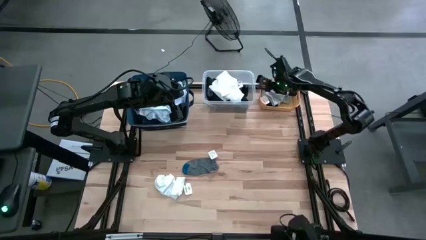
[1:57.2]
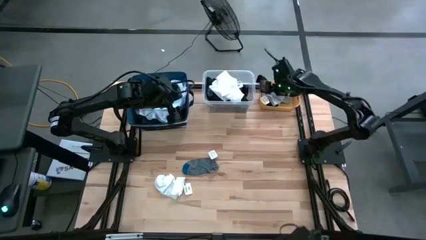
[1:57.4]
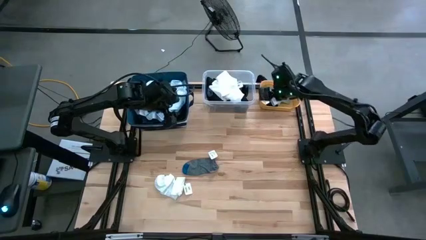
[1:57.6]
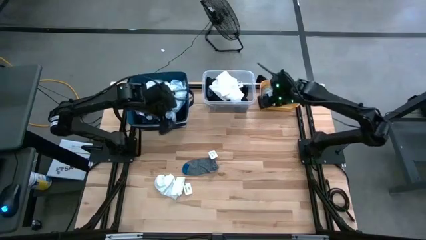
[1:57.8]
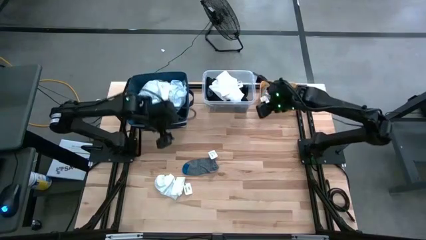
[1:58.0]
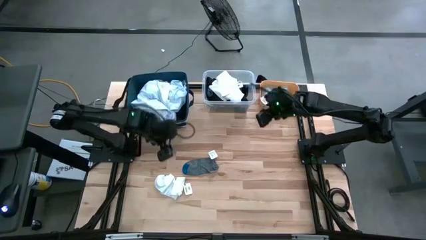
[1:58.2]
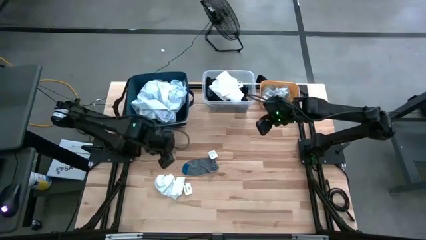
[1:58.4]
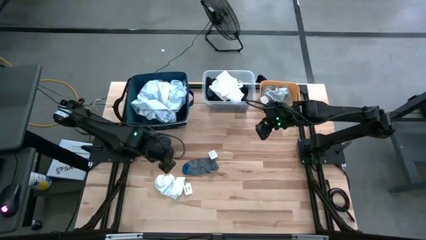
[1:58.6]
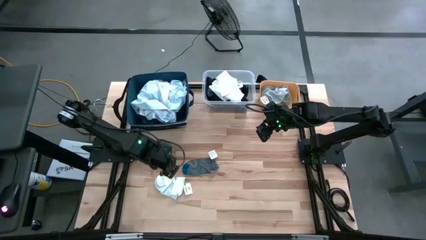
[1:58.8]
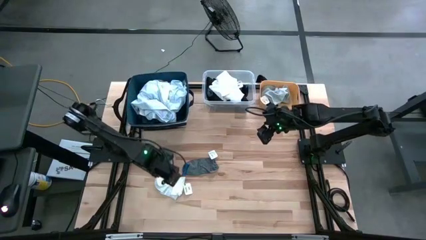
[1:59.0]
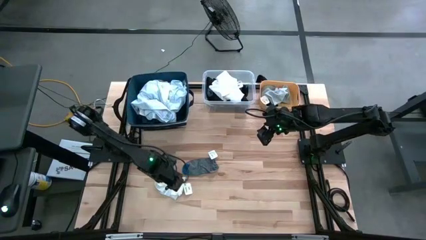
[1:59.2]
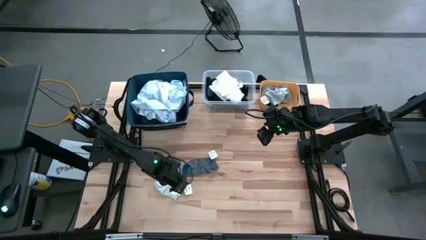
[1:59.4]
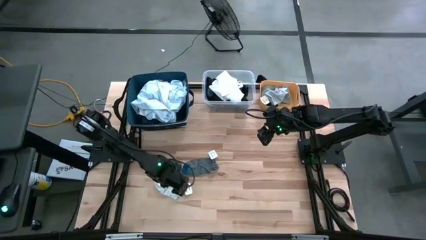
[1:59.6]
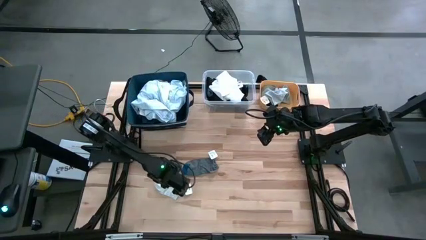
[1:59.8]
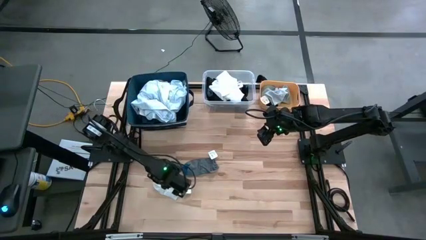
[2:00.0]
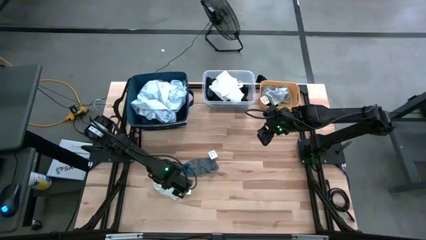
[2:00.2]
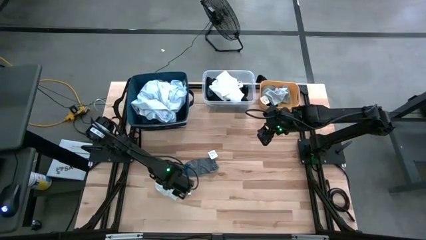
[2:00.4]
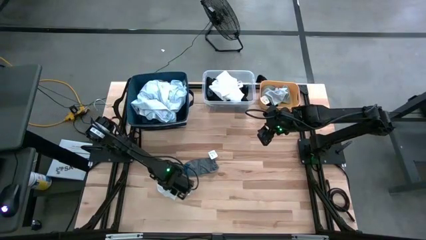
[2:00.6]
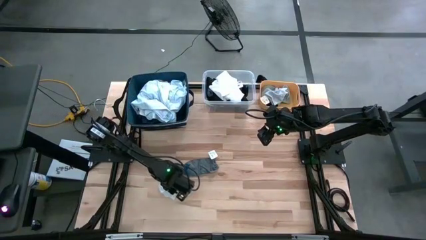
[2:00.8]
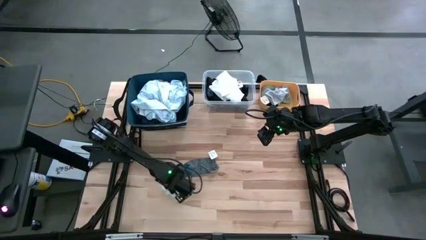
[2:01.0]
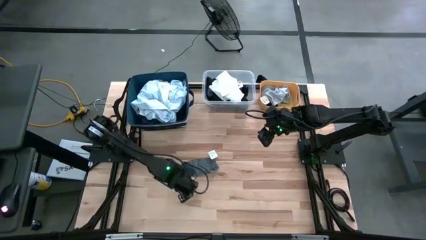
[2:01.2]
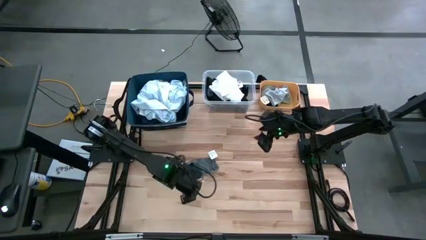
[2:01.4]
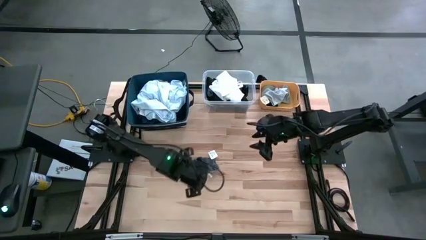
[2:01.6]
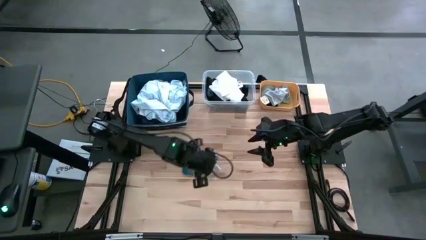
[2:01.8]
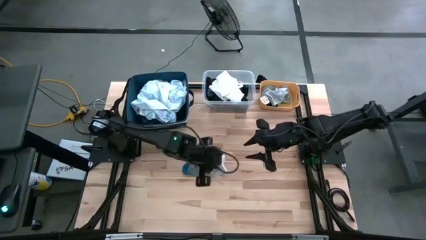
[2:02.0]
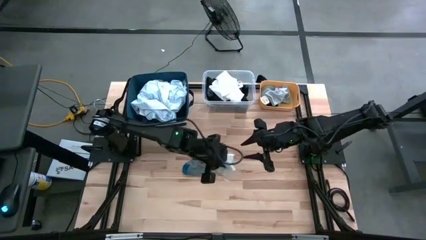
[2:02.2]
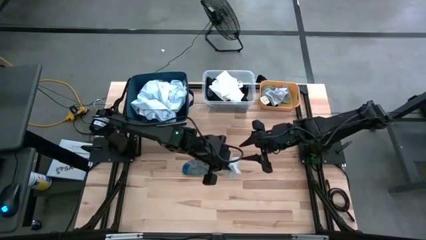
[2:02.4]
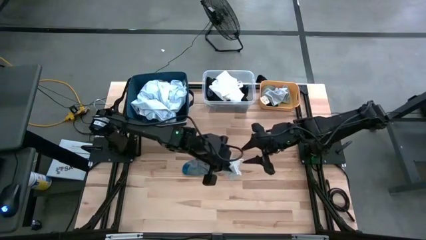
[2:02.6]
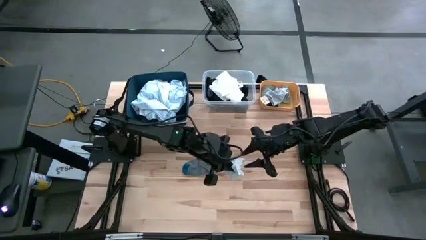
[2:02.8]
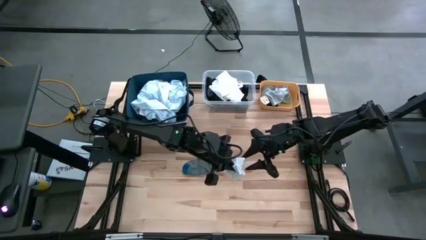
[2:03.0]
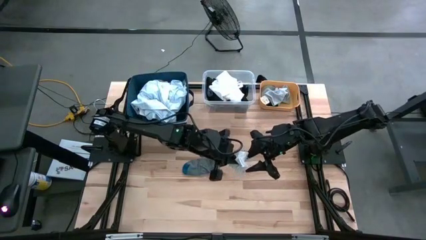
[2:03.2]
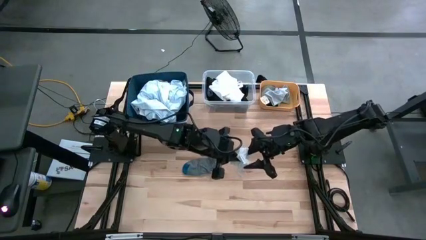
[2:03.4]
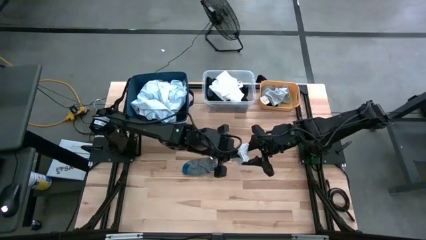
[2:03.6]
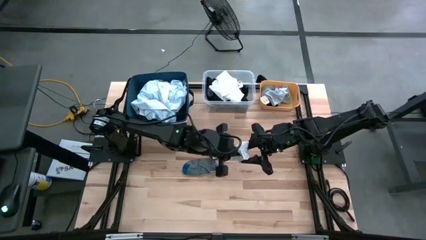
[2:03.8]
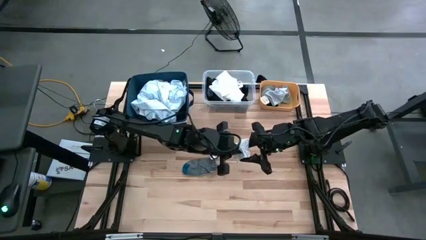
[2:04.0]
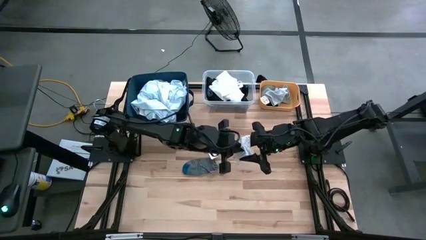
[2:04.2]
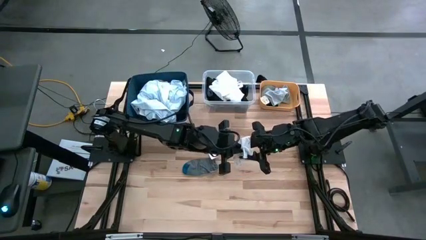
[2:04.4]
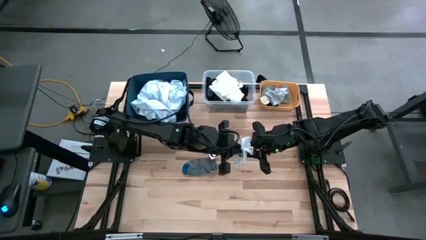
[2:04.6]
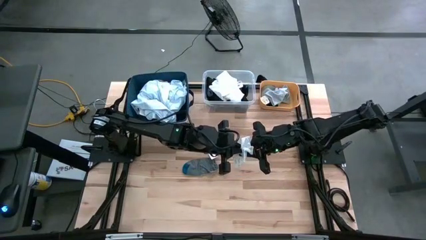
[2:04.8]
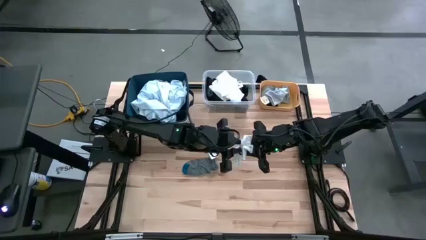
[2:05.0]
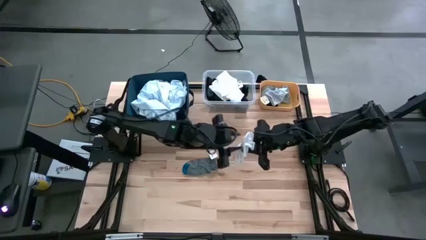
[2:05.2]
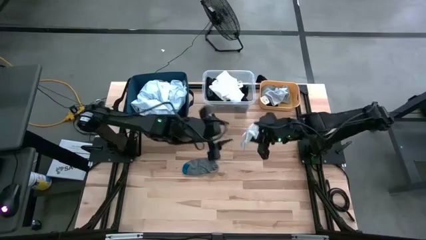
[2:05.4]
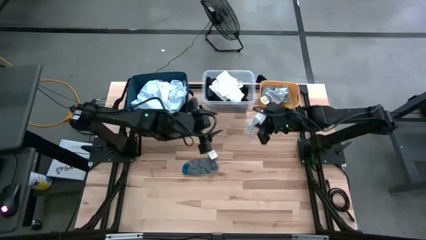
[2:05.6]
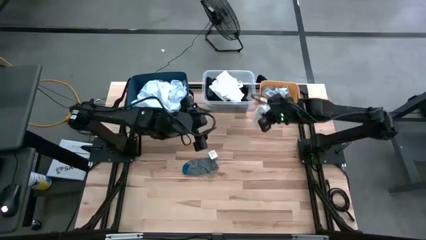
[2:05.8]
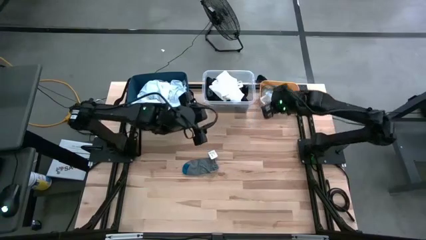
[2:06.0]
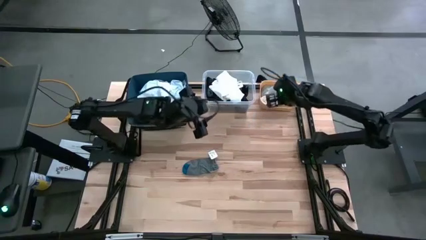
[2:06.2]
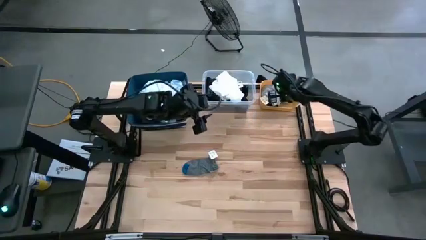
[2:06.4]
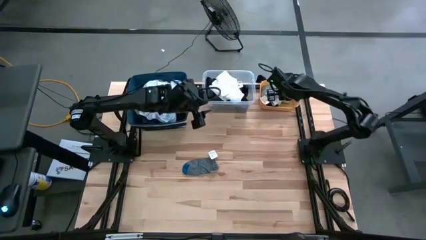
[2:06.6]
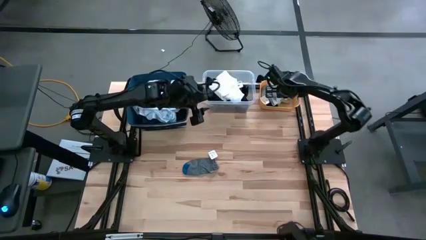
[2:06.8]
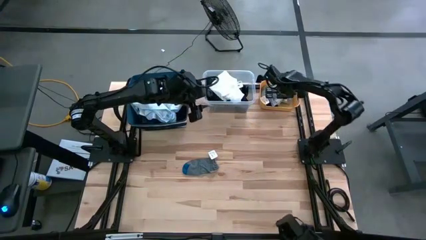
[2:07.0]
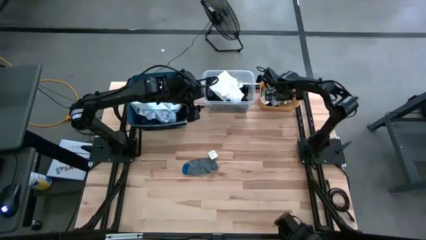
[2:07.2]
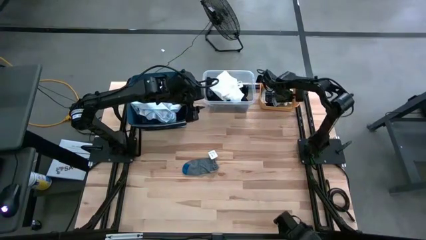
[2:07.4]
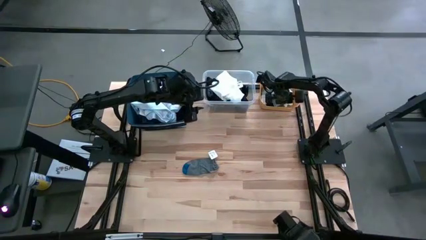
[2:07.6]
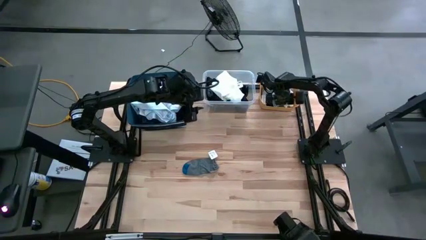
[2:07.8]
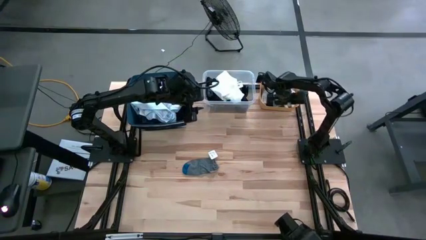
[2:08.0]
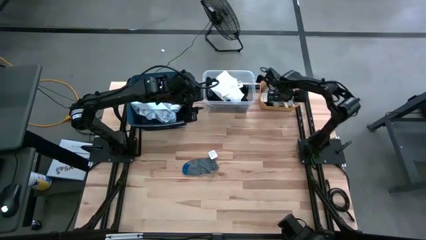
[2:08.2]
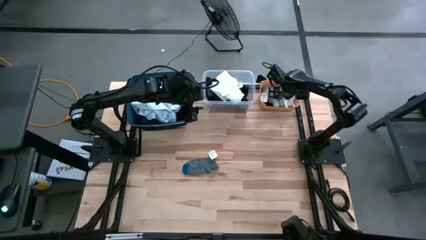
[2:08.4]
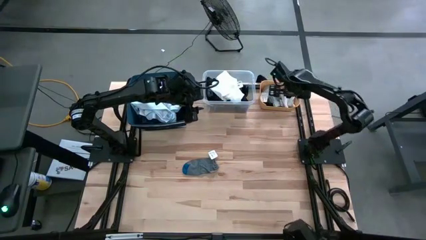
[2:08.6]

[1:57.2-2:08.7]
Task: Pick & Place Cloths
Put the white sock into the yellow bin

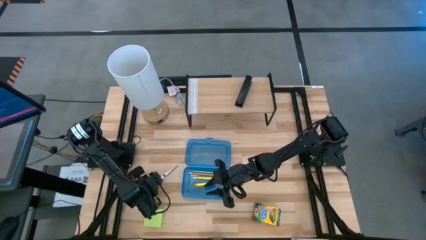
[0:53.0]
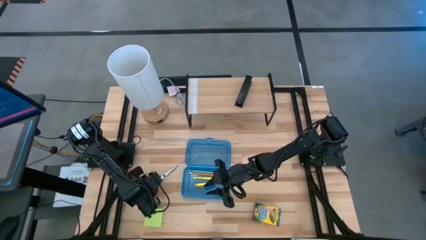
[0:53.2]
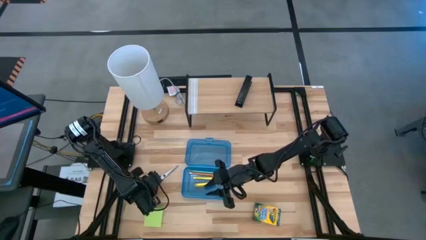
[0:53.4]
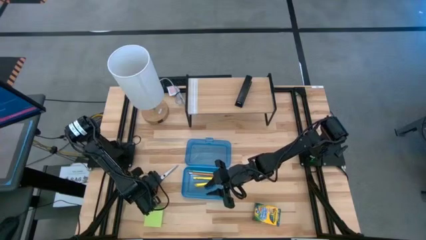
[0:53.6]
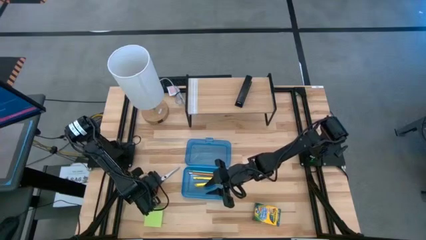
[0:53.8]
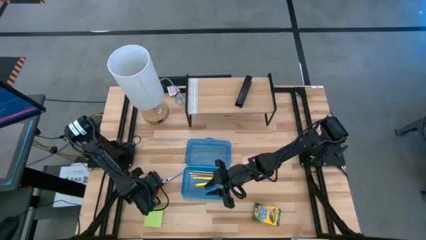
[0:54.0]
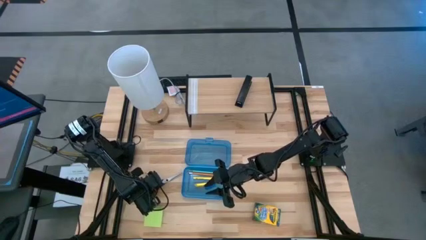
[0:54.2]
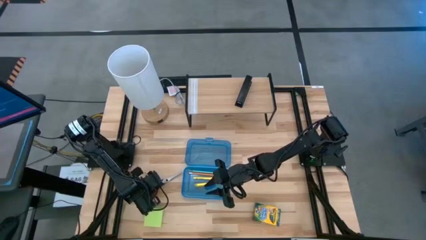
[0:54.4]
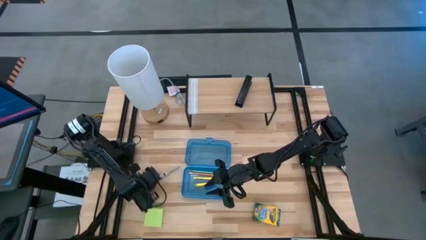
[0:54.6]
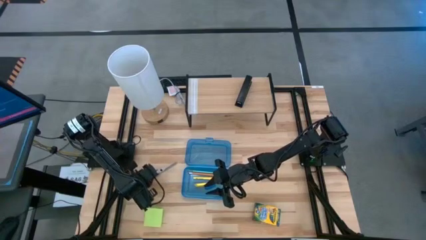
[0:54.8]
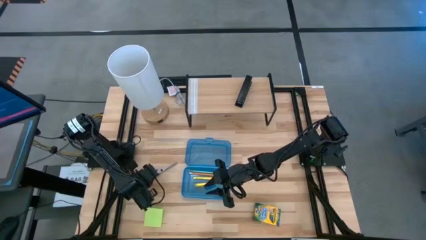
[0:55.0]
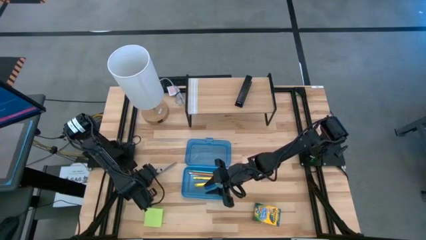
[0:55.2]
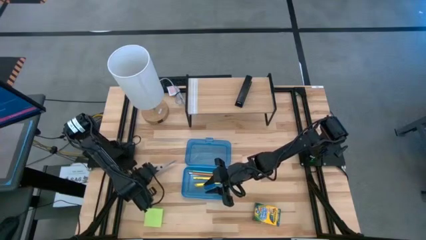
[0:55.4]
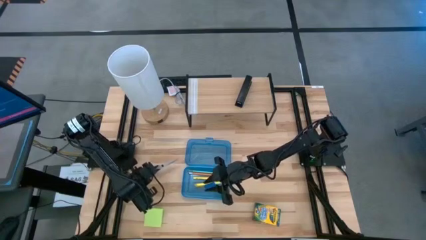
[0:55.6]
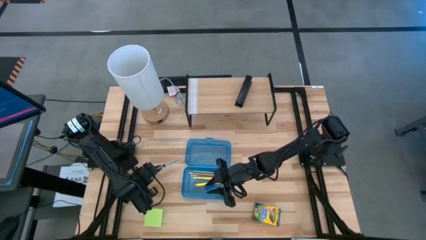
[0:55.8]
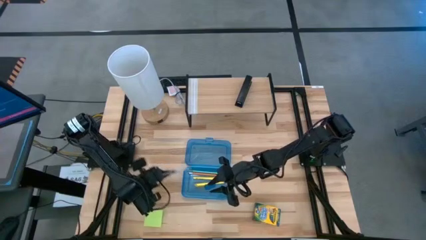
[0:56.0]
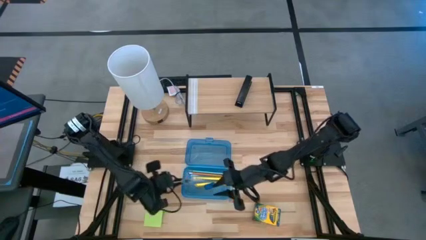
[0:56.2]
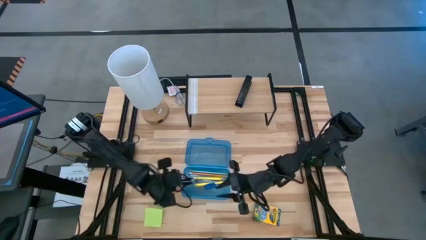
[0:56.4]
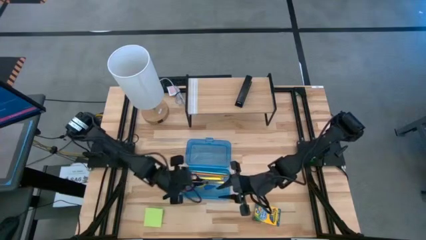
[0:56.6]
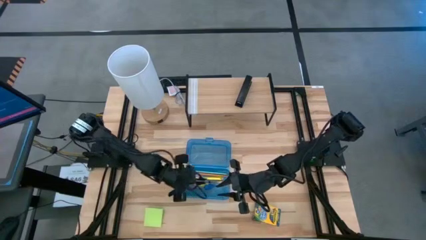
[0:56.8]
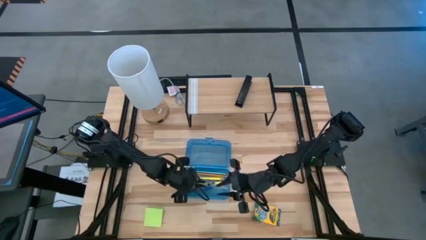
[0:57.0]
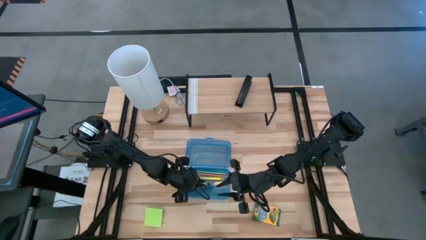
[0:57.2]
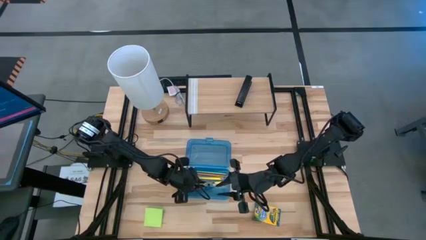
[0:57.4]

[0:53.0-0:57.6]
Task: Pack school essentials
Put the black scissors into the supply box
